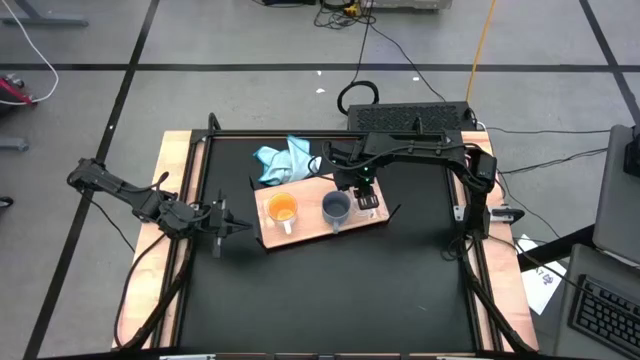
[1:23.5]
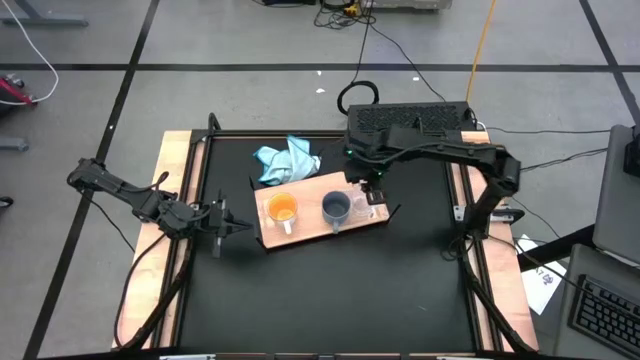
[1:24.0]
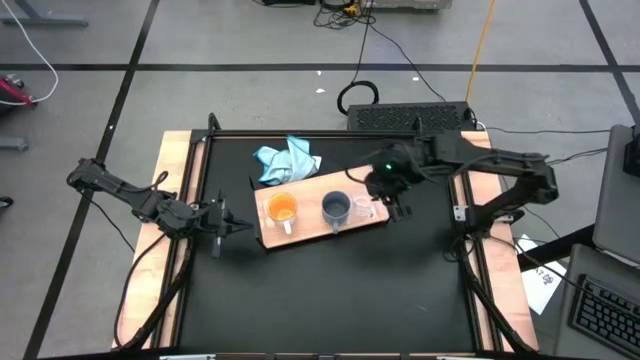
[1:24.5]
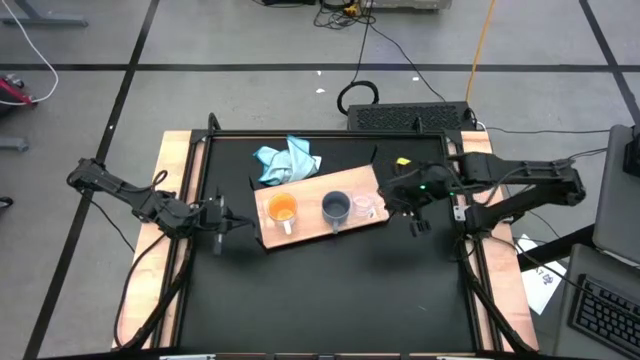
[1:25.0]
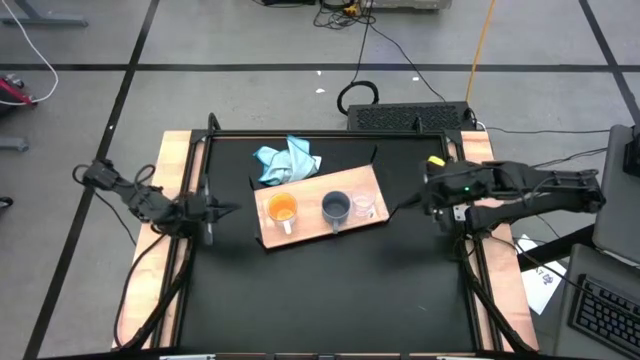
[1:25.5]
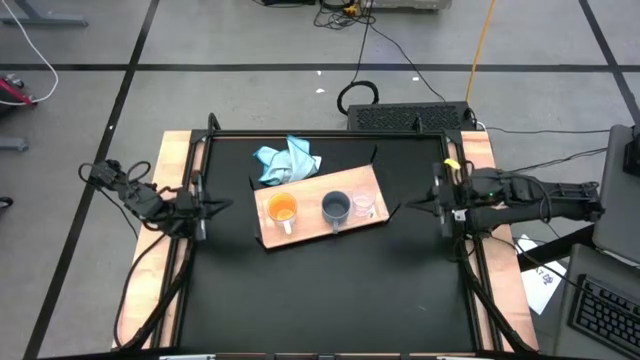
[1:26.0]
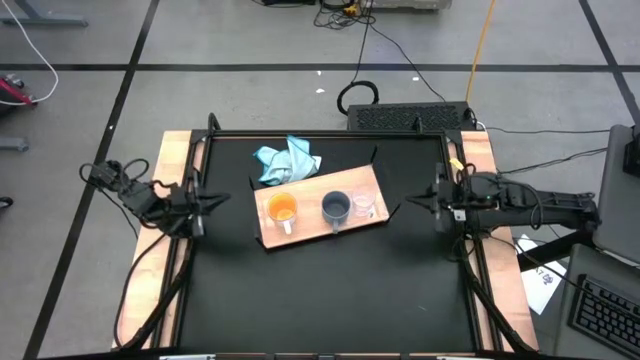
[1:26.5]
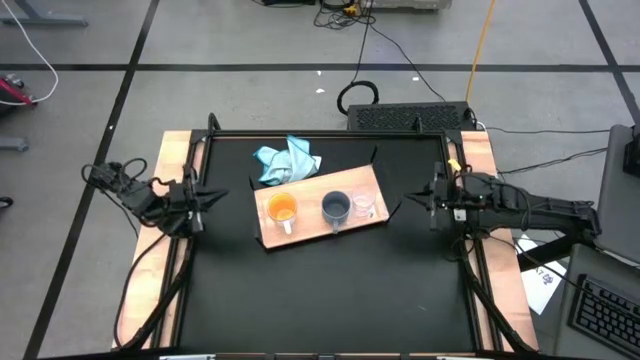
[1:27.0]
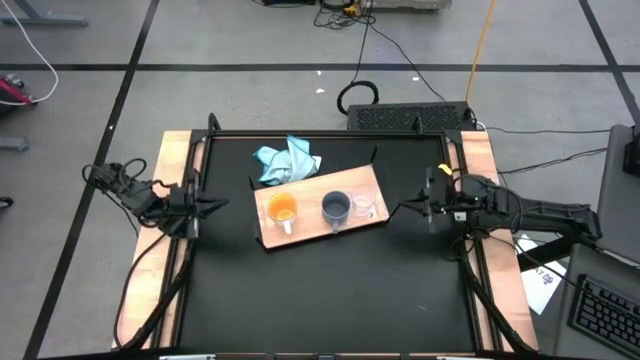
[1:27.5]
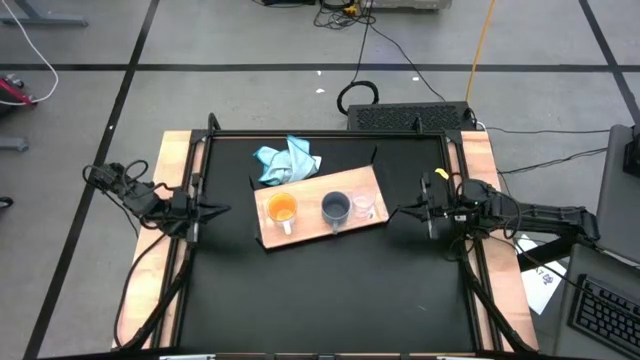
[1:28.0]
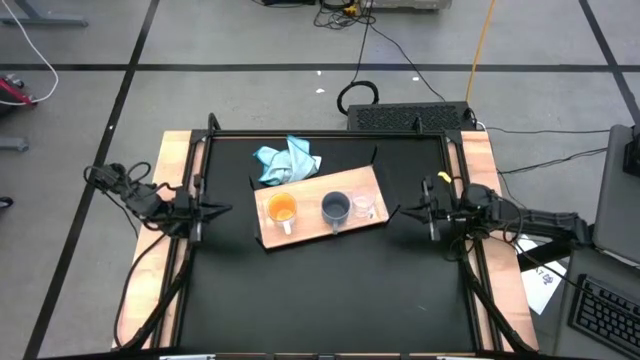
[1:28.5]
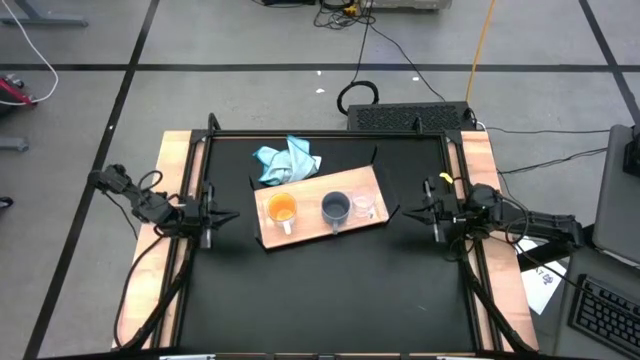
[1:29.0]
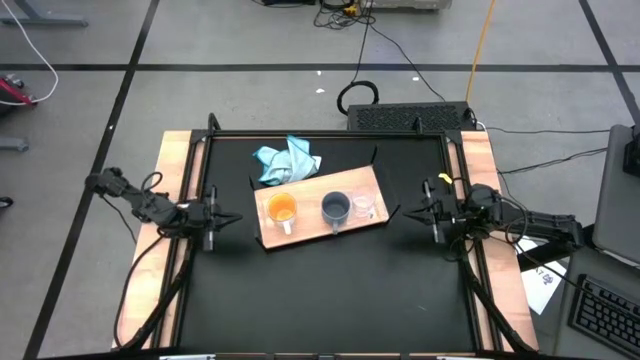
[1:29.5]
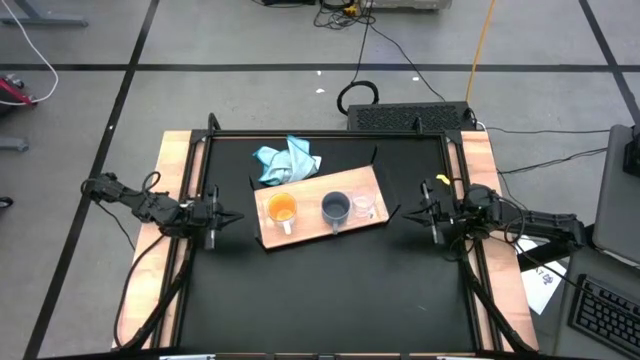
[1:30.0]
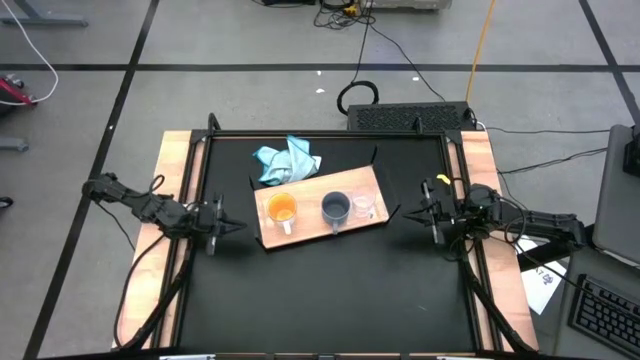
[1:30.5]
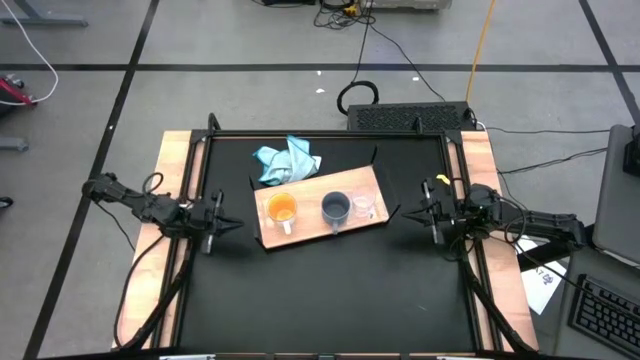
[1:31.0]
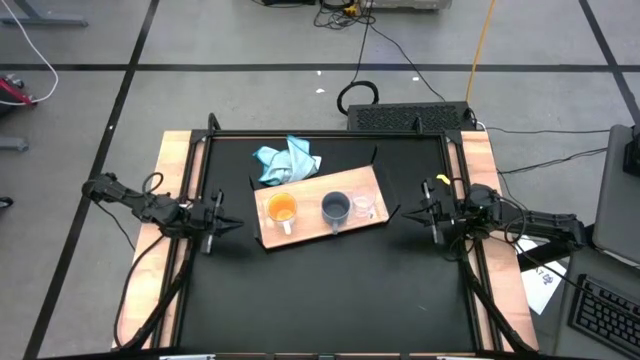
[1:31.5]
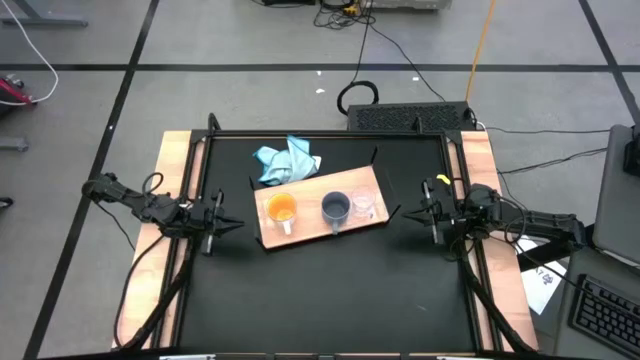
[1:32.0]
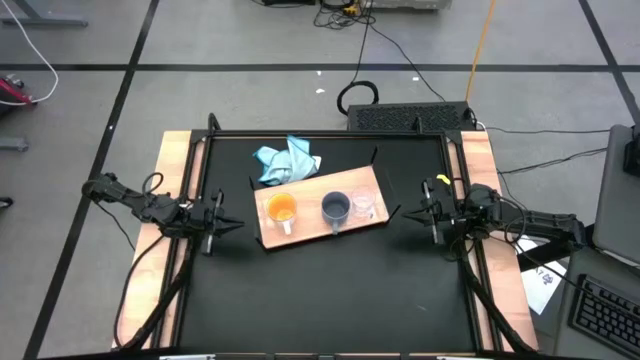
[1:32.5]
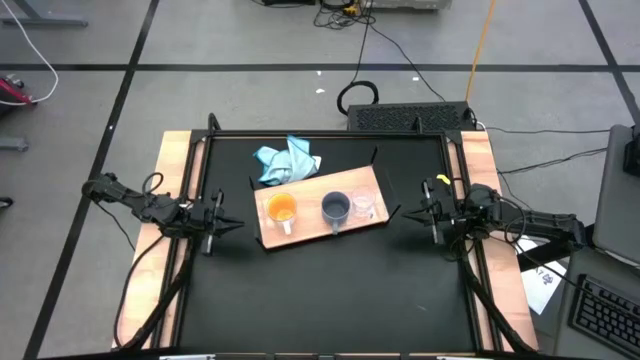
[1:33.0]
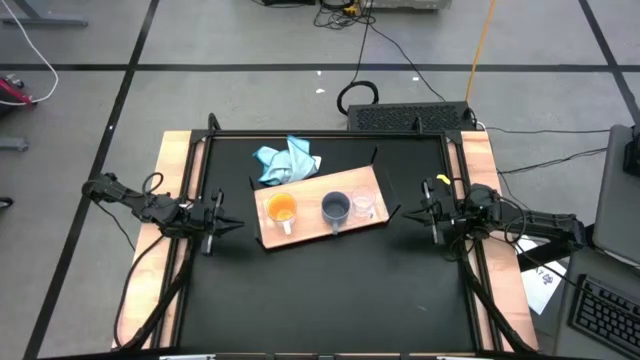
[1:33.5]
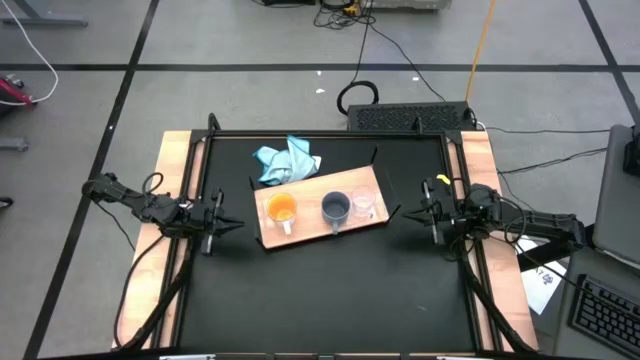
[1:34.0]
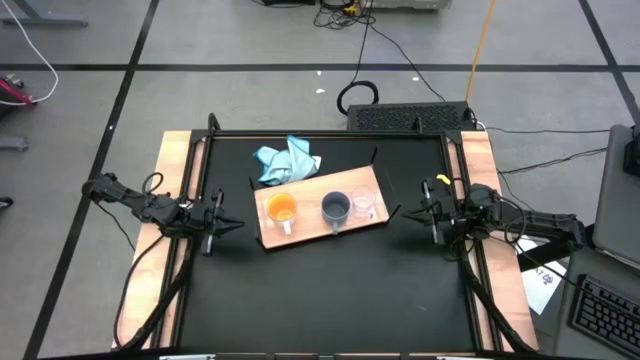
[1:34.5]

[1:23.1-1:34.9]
Task: Stack small to large cups/mugs on shelf
Return to Home Position

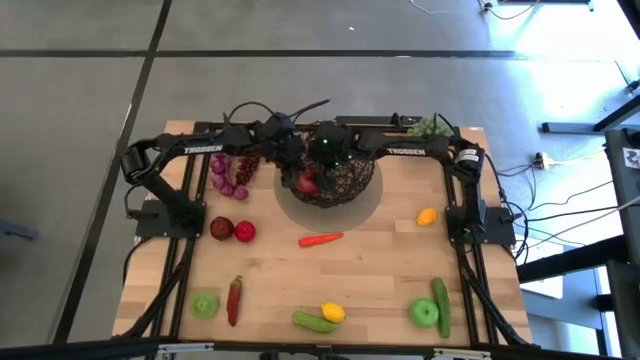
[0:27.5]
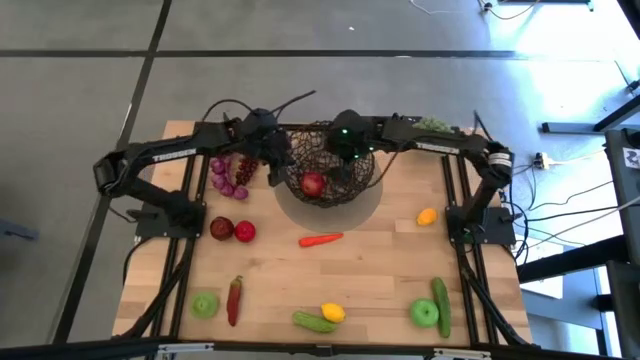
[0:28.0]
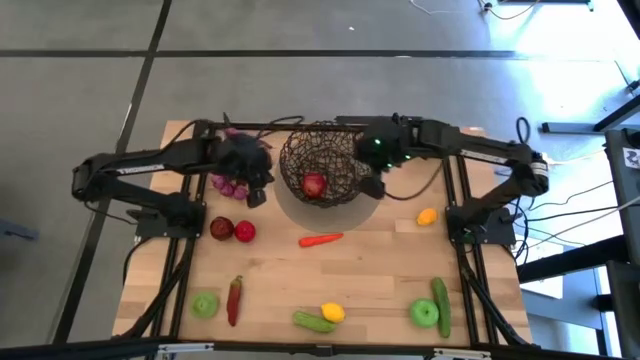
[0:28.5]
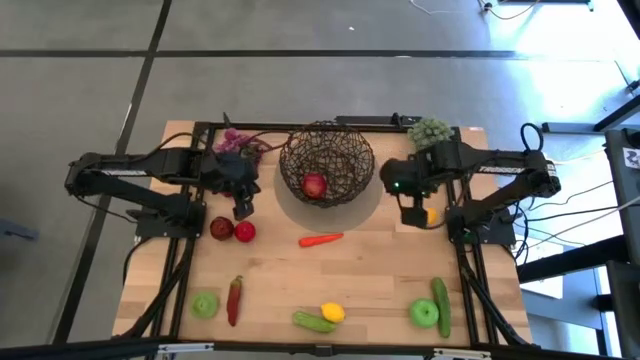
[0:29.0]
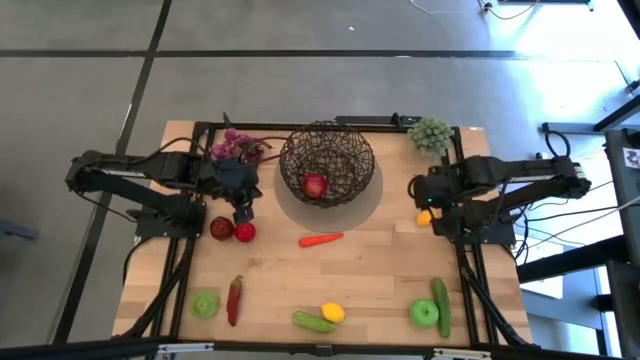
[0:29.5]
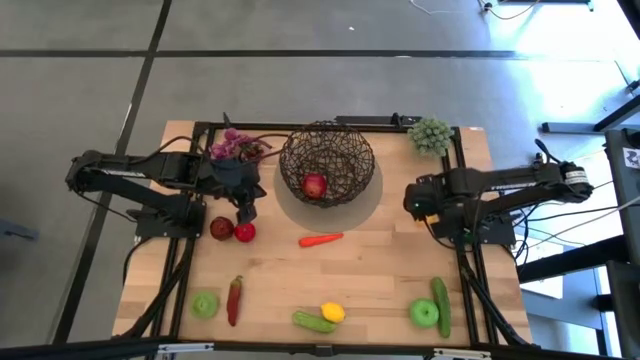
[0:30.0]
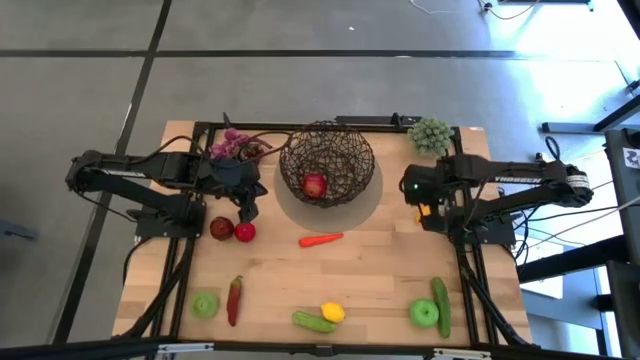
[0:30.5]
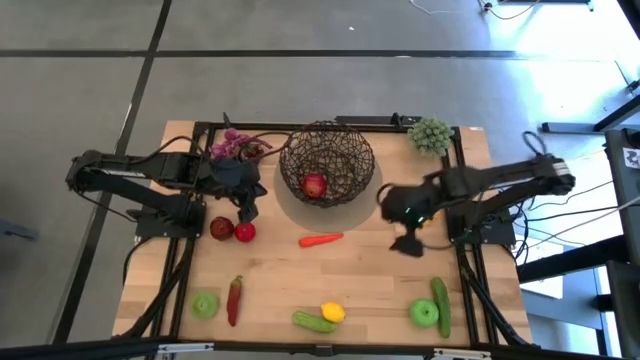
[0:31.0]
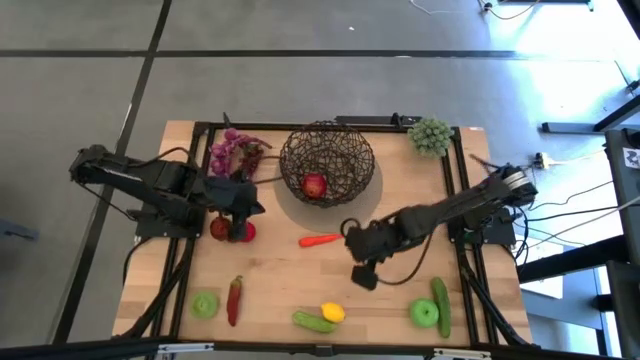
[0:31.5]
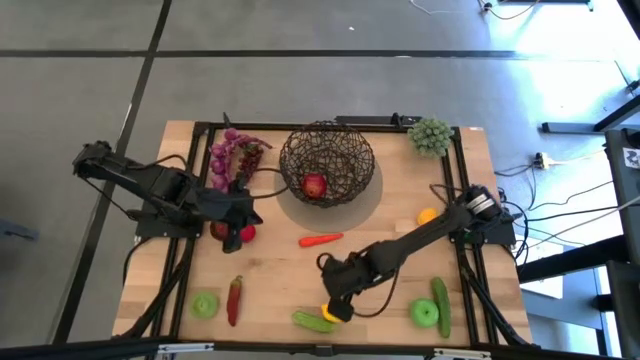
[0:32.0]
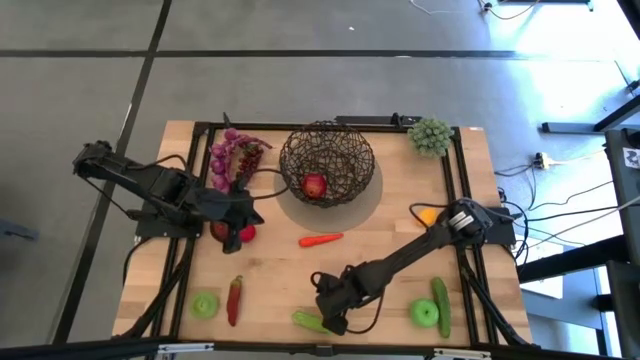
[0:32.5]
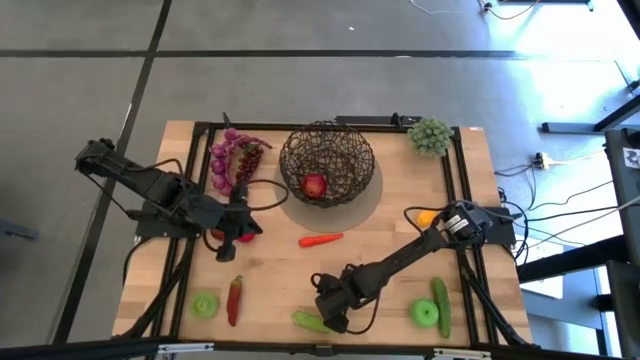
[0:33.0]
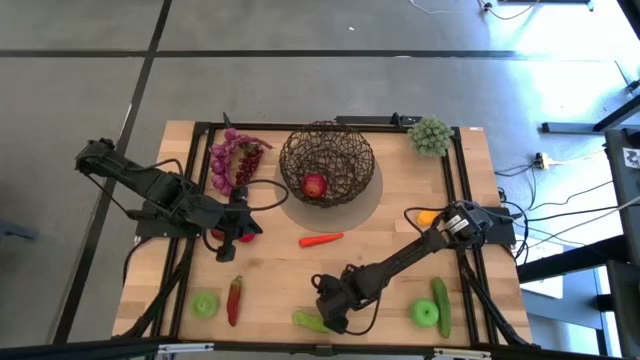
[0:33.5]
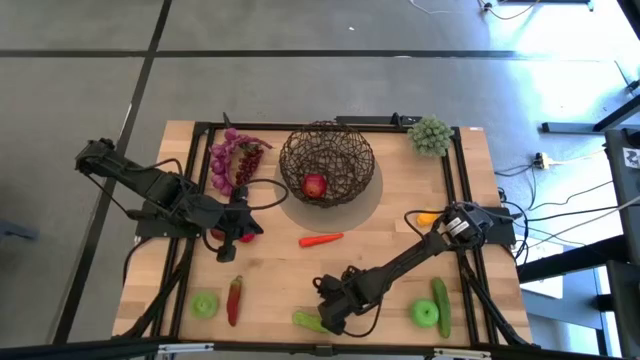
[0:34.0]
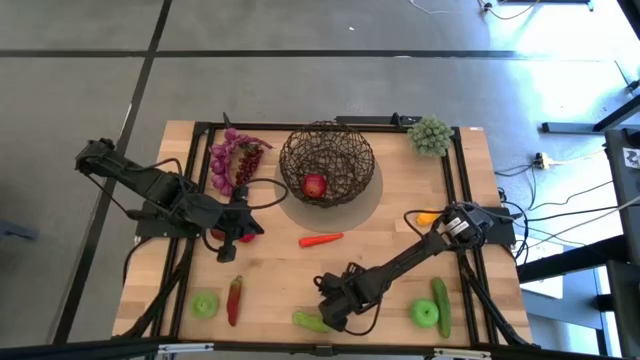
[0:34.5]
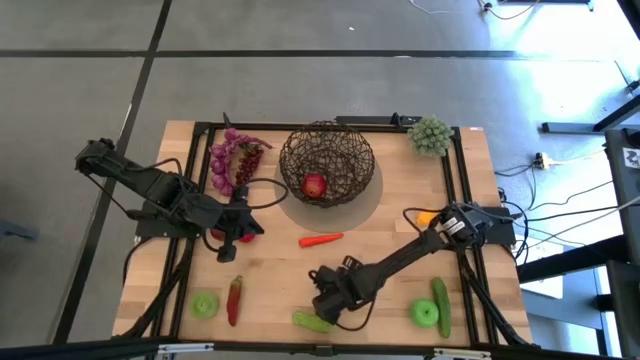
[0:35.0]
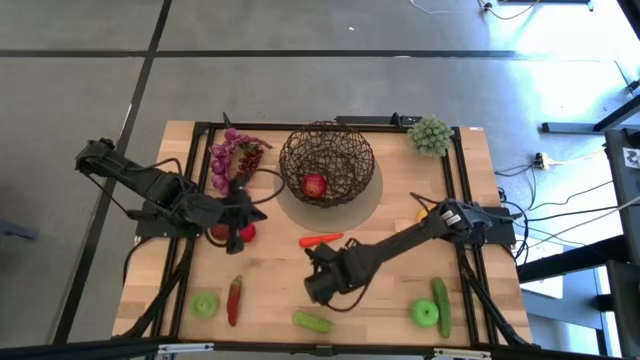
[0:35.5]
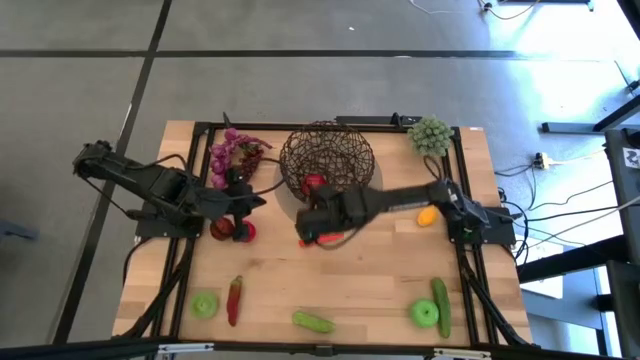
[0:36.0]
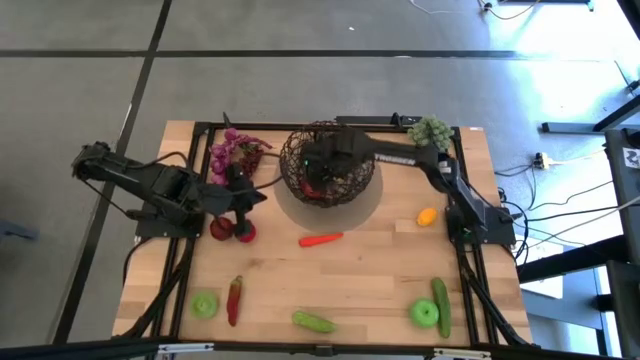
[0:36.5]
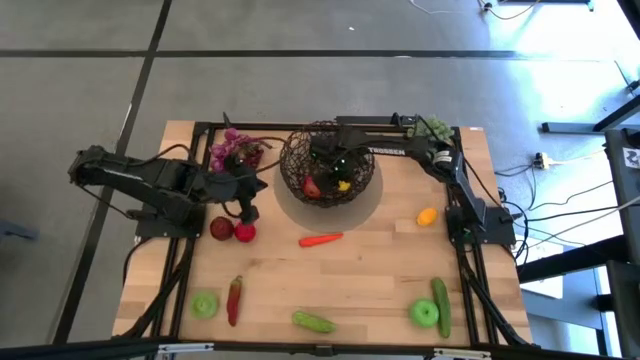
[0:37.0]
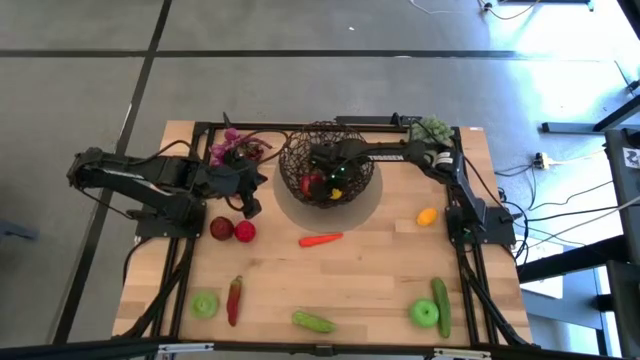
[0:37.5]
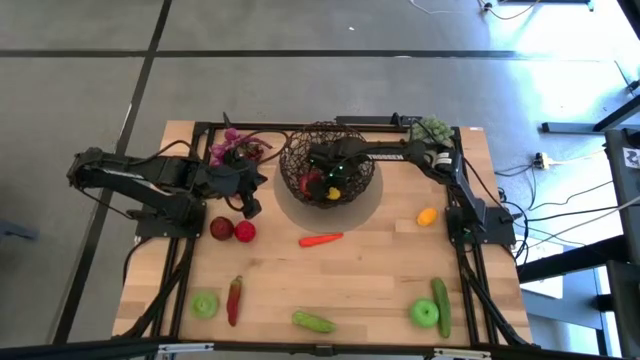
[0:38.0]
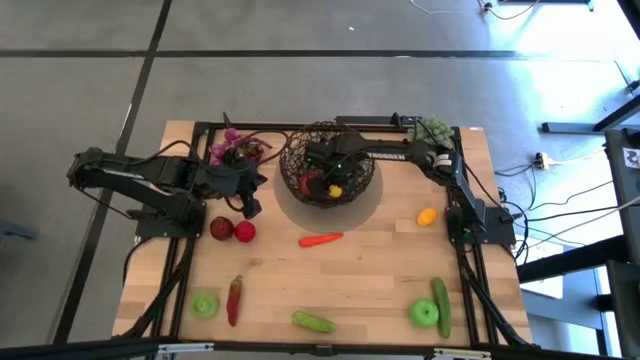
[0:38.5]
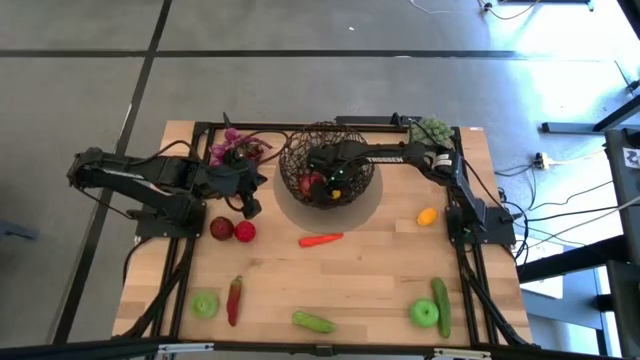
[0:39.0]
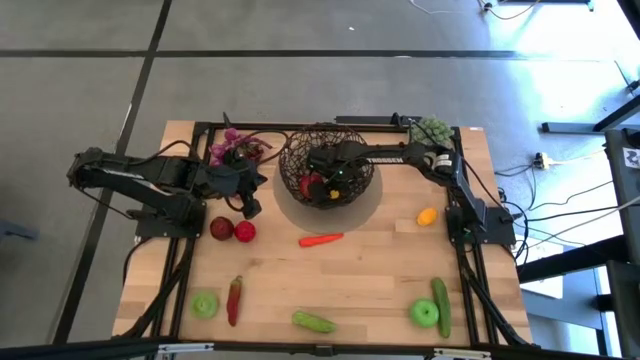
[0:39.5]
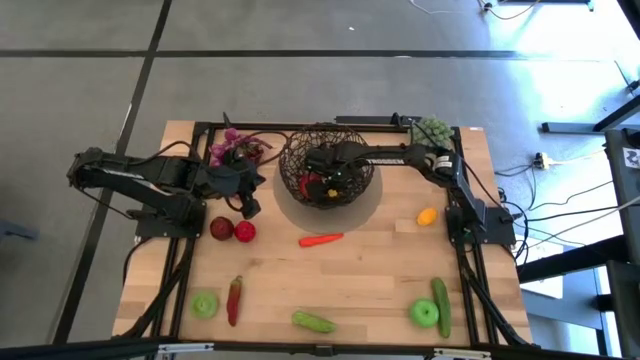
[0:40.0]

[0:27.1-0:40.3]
Task: Build produce basket
Put the bottom lemon into the wire basket
